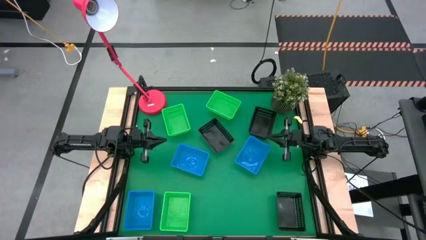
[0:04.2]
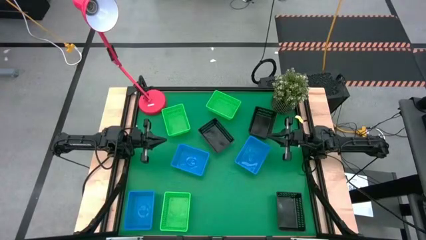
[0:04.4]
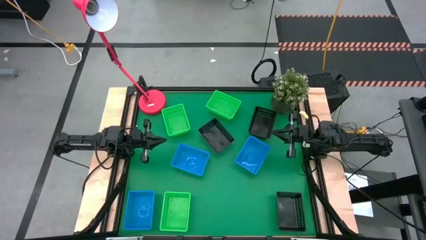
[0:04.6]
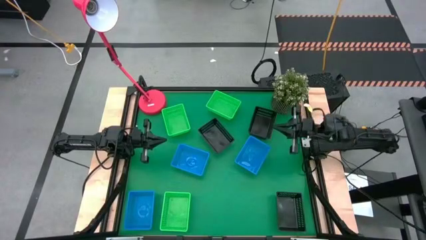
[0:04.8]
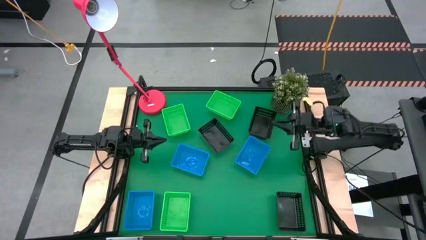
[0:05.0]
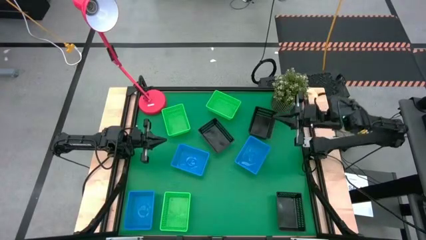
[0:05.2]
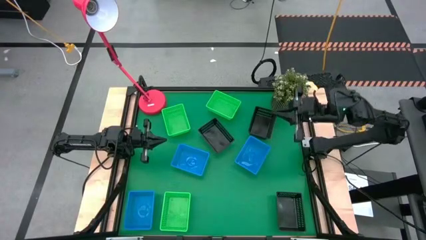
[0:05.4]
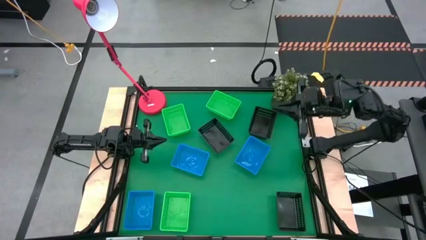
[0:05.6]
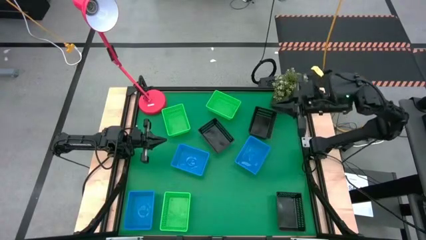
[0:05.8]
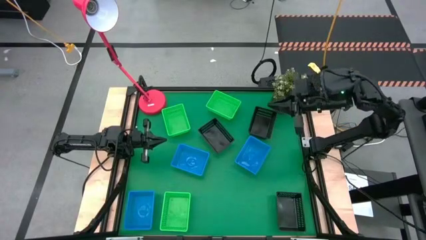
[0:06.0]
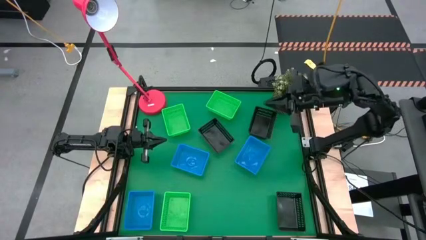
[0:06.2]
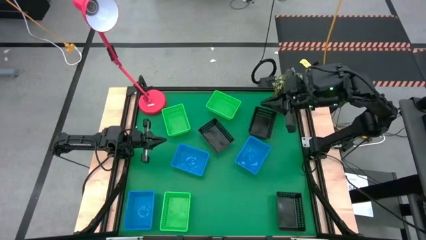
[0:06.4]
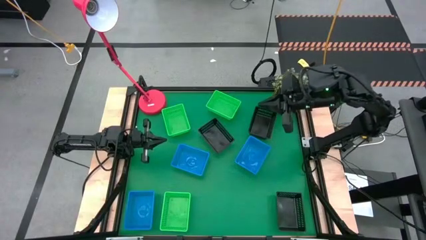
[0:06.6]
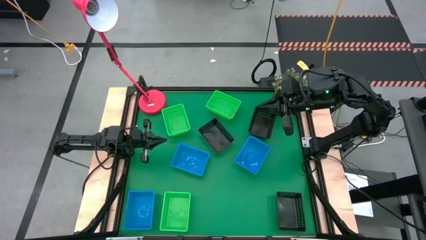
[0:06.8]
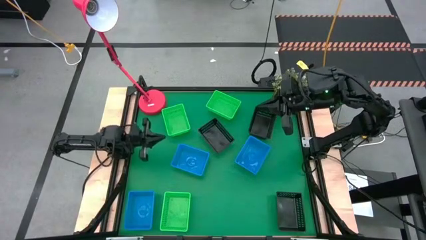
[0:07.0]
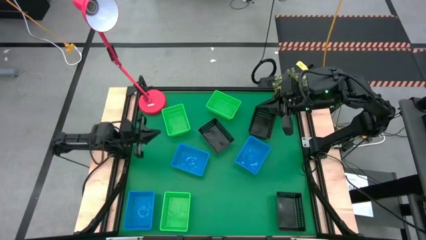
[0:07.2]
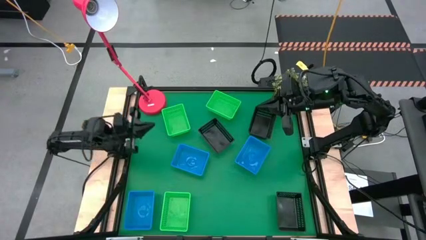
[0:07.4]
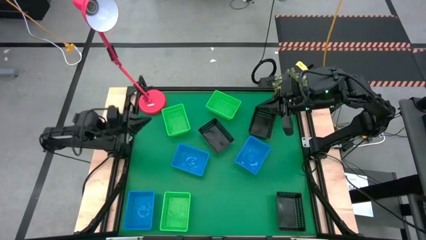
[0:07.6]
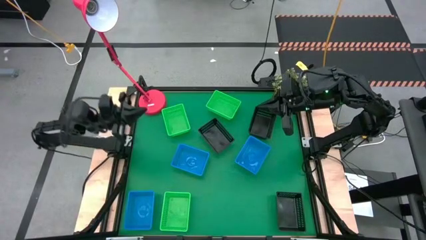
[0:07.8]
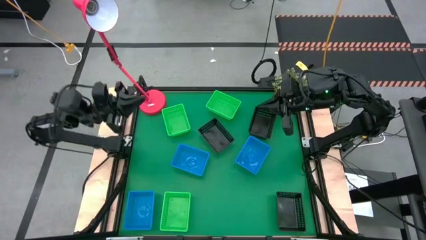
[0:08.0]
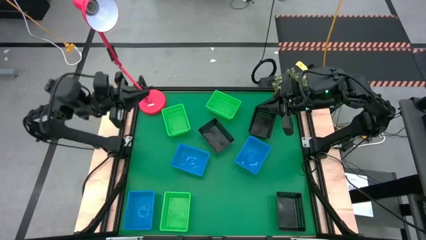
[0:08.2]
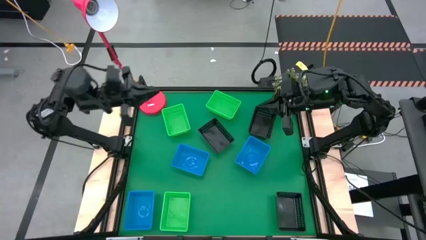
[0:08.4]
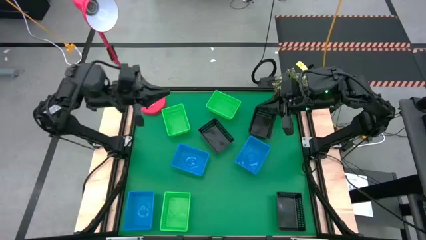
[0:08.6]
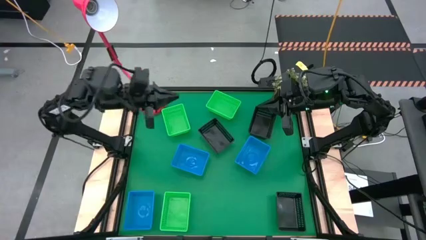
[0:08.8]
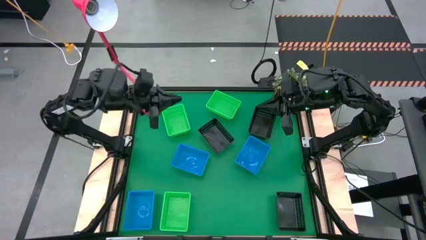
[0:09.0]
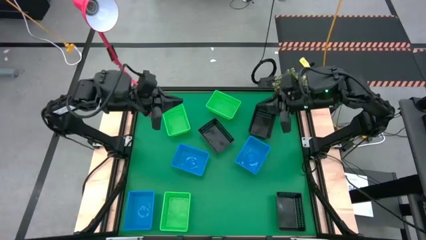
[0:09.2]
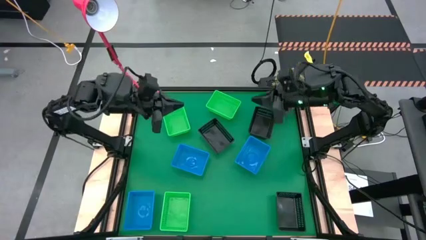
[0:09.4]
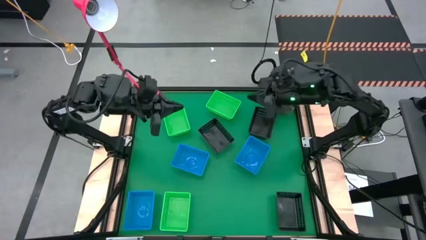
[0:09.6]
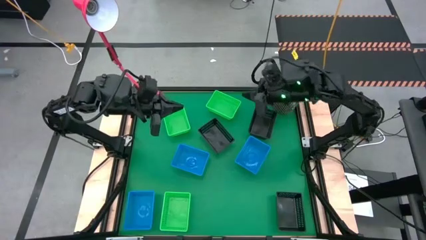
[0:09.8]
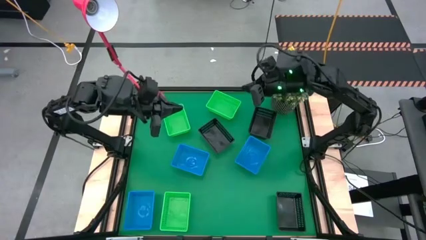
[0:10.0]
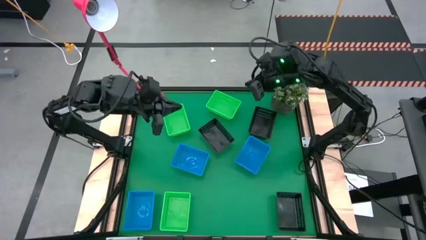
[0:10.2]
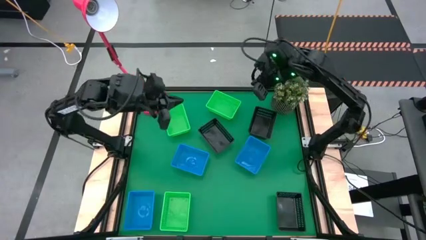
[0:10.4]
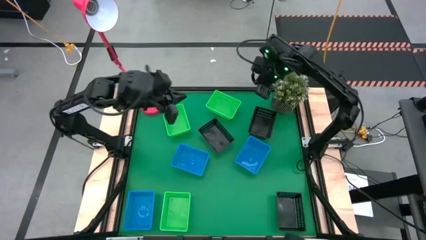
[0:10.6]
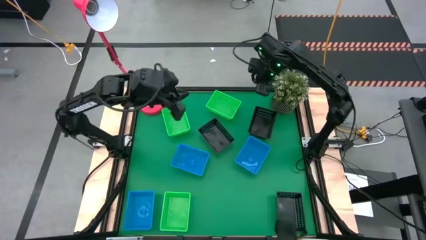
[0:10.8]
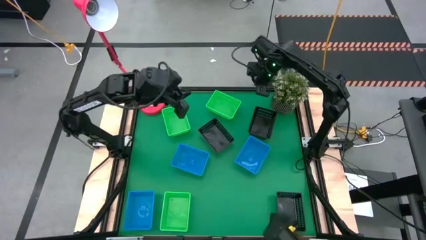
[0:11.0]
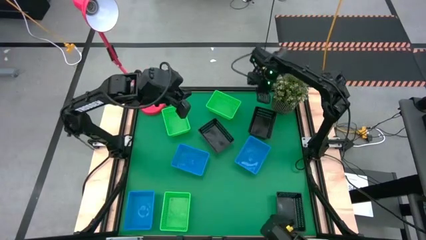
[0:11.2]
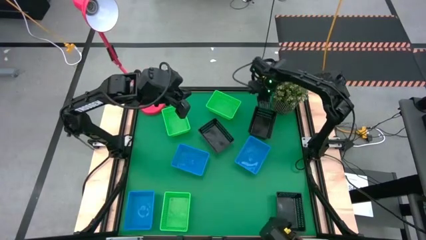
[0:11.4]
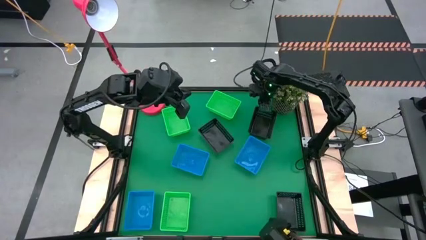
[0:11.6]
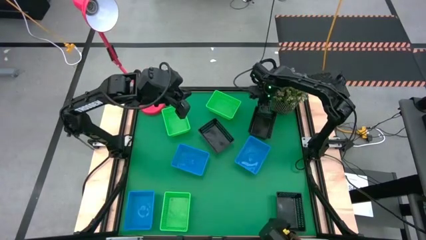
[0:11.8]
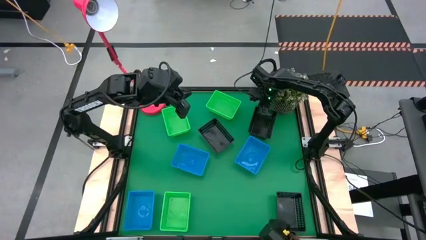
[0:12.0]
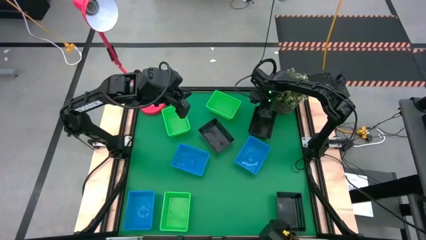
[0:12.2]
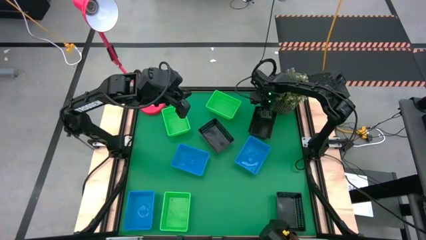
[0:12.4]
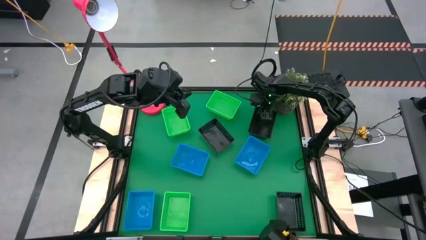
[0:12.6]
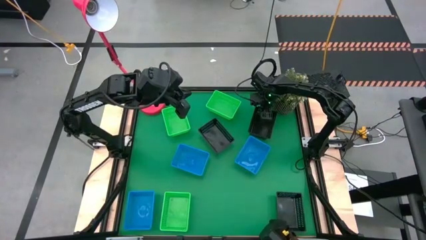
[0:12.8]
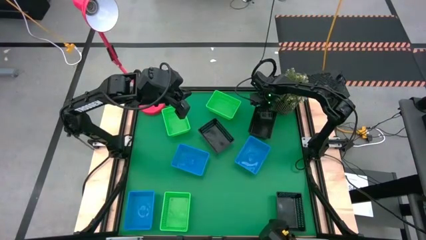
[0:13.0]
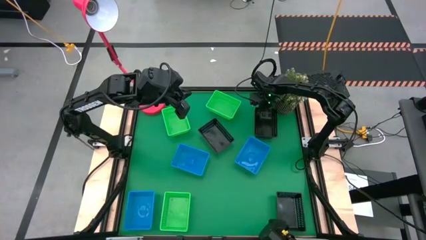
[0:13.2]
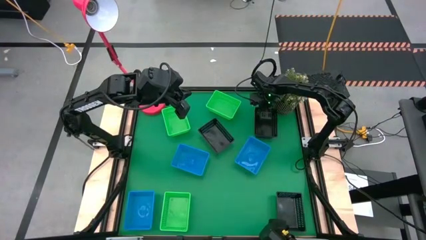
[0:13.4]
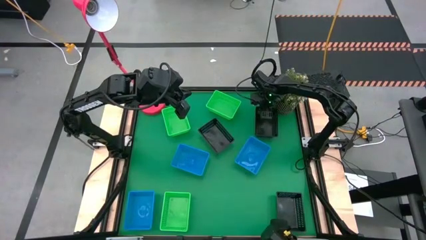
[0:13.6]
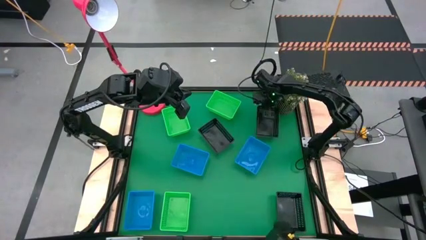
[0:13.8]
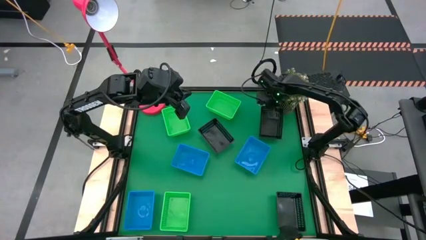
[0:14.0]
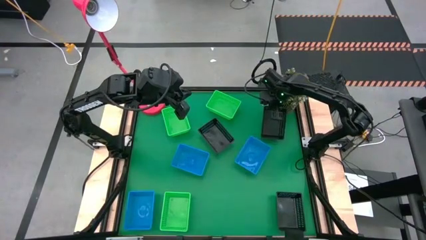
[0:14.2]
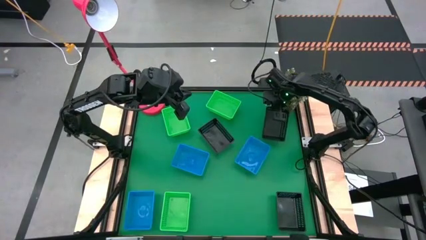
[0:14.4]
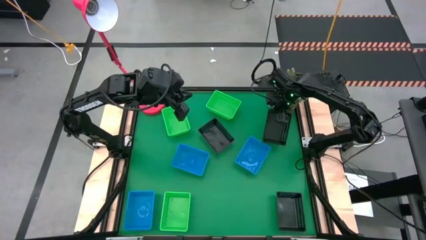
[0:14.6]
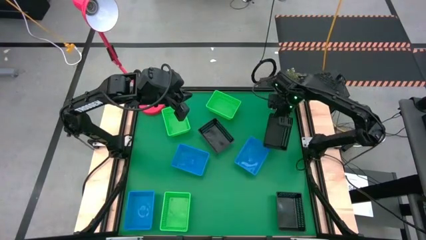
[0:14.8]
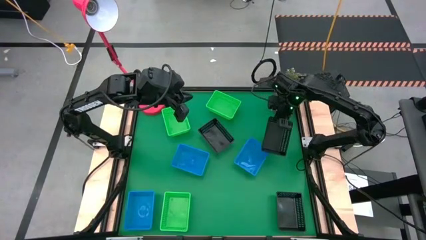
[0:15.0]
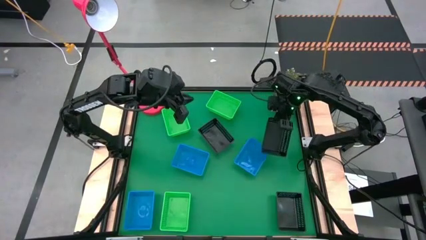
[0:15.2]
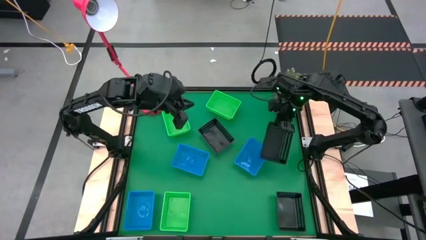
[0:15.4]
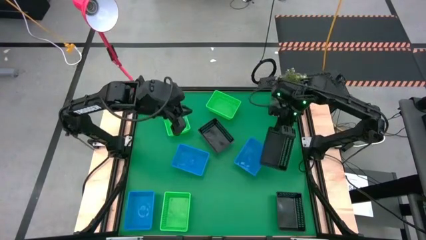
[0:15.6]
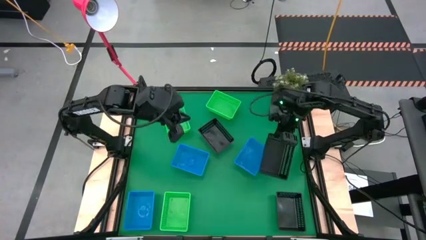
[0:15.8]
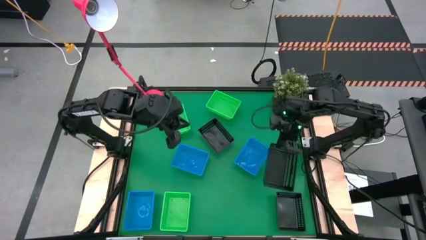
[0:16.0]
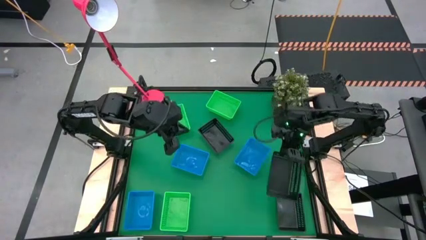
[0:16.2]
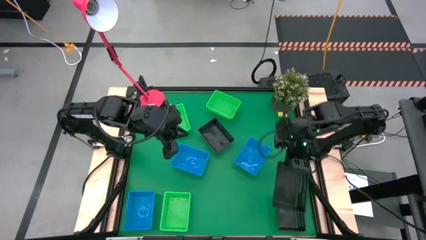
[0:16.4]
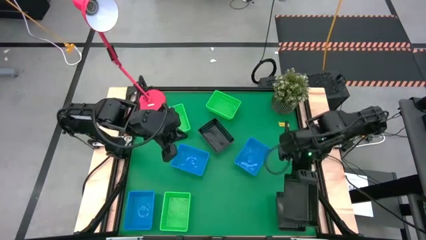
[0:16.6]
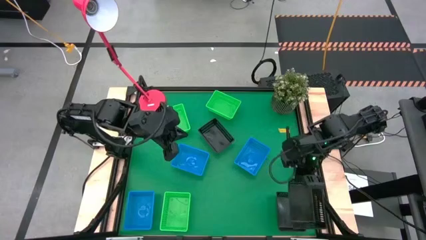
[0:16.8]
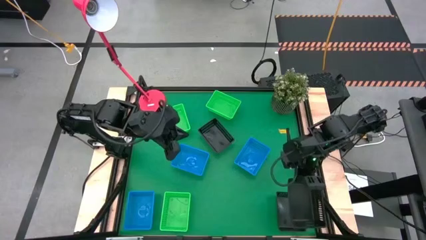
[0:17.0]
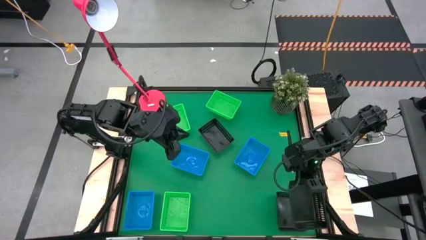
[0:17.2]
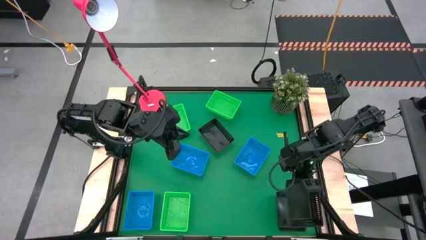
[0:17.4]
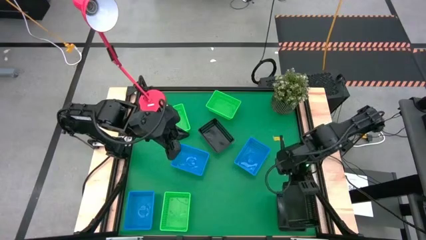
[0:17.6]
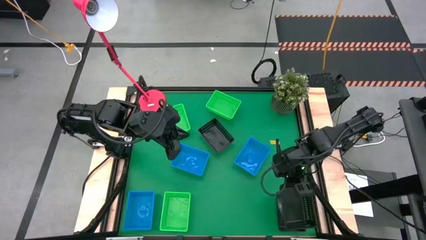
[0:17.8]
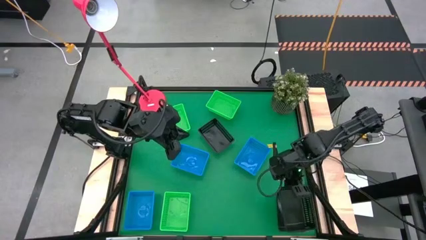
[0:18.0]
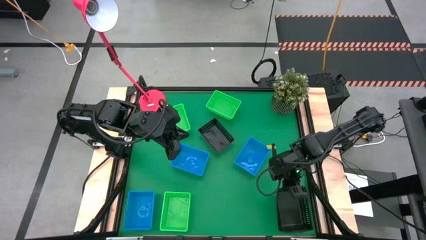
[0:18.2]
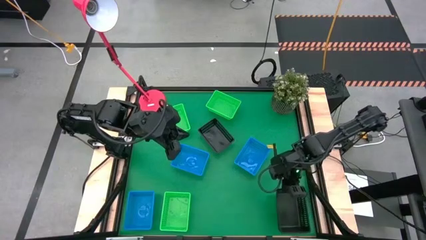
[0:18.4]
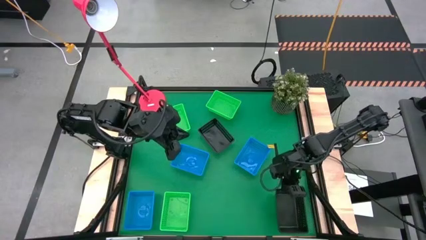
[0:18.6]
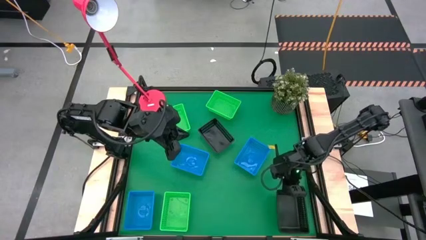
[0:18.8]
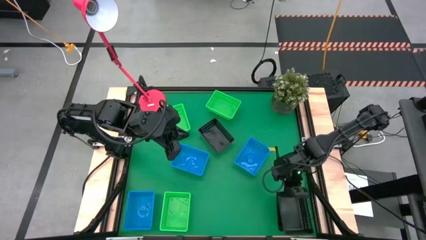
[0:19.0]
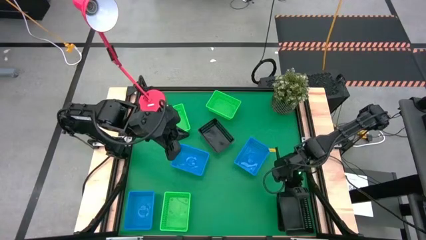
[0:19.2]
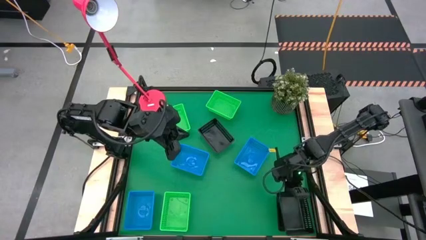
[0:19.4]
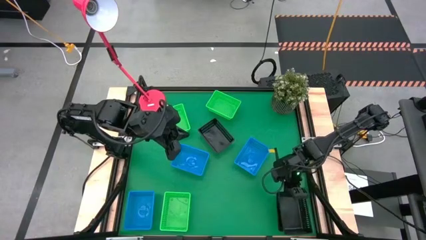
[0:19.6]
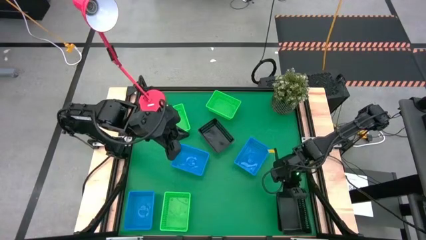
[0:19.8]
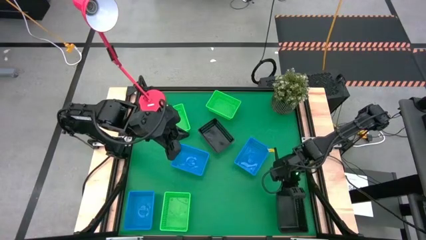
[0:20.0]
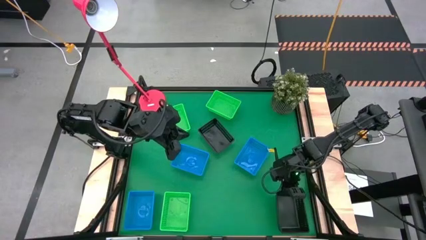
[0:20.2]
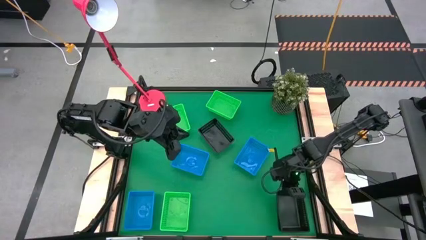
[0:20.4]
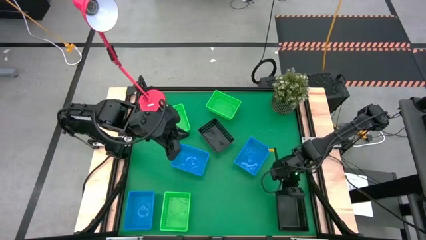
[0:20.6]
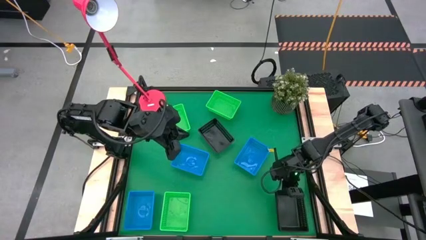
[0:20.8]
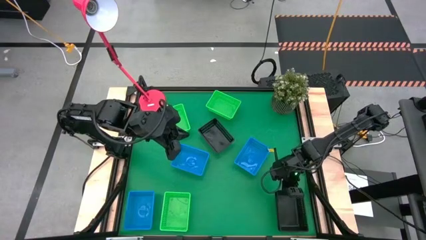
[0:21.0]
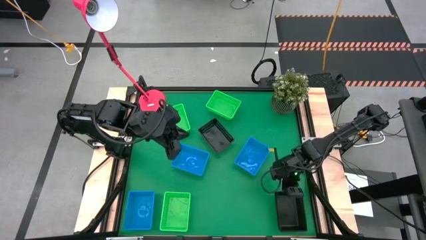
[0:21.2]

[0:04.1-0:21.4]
Stack the top right black bin on top of the bottom black bin
